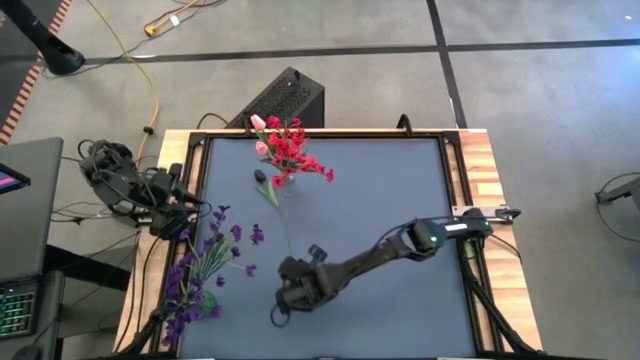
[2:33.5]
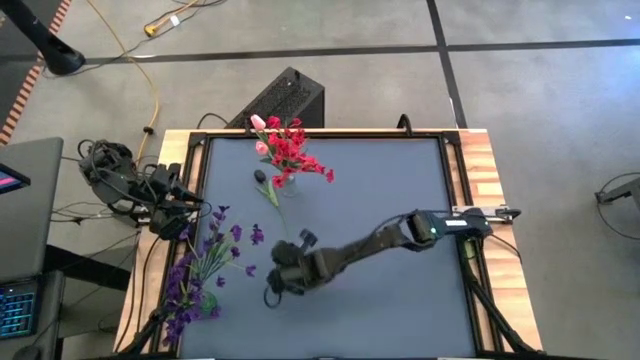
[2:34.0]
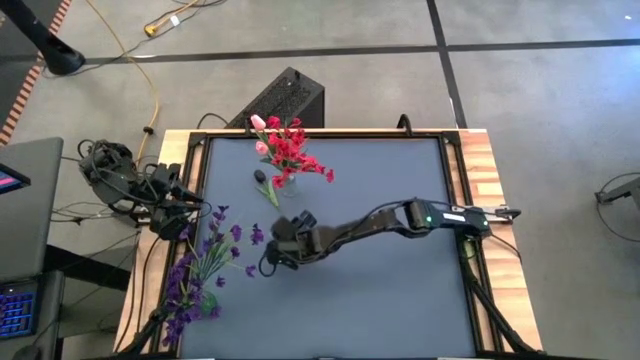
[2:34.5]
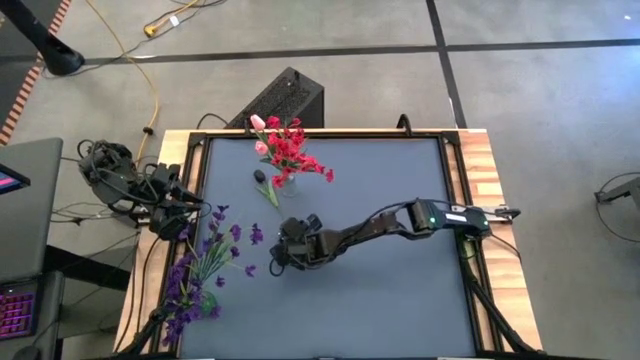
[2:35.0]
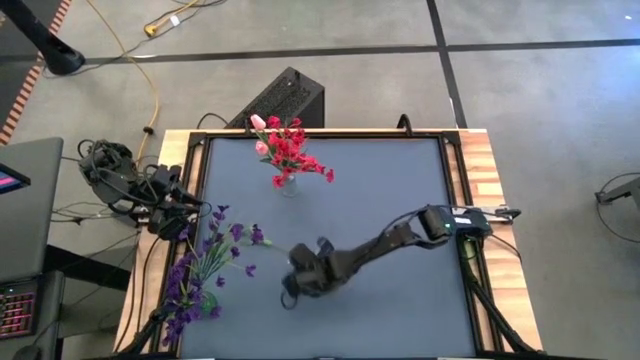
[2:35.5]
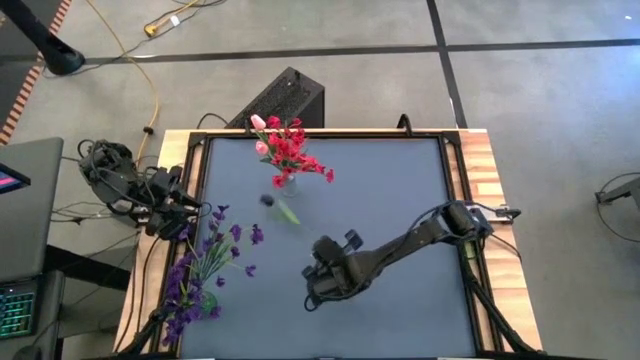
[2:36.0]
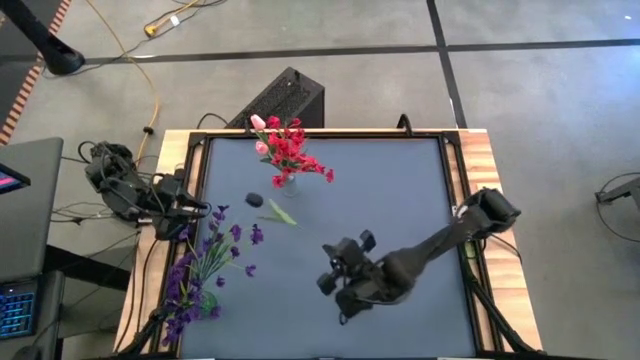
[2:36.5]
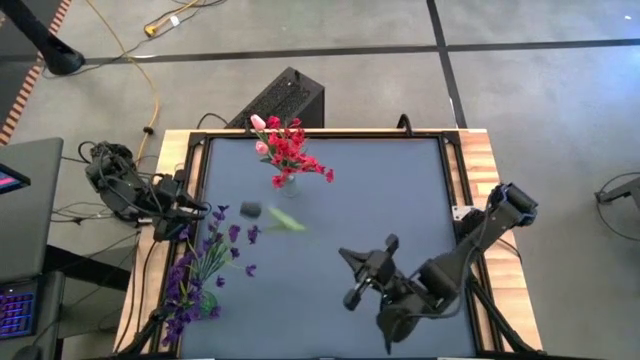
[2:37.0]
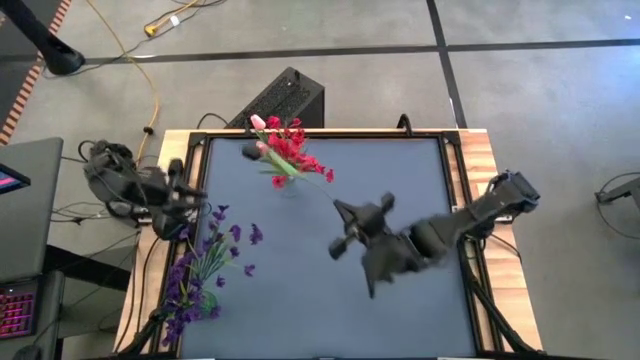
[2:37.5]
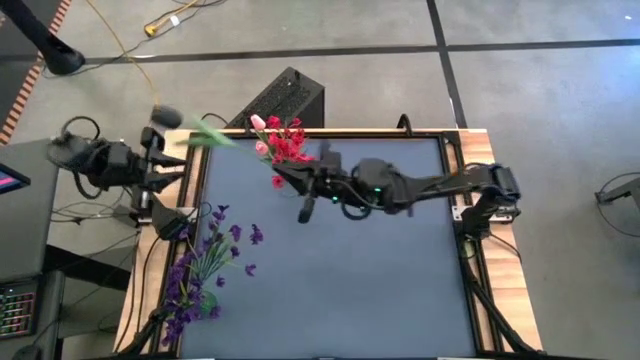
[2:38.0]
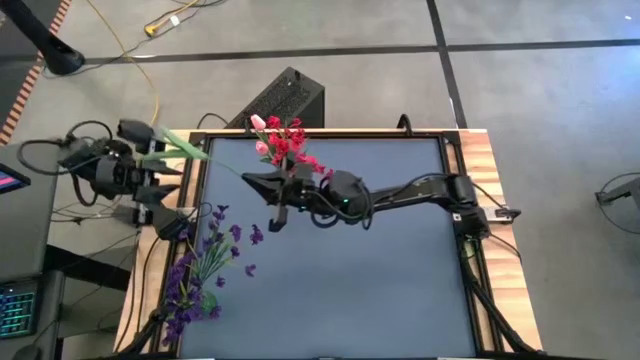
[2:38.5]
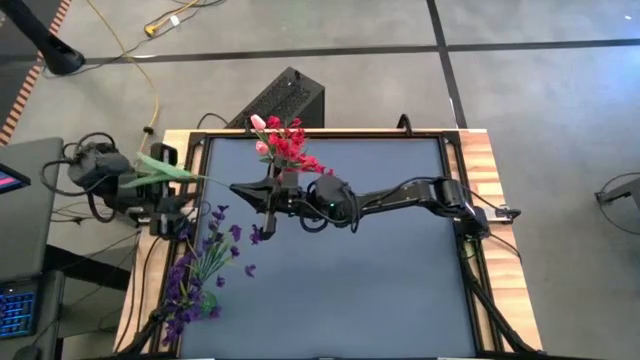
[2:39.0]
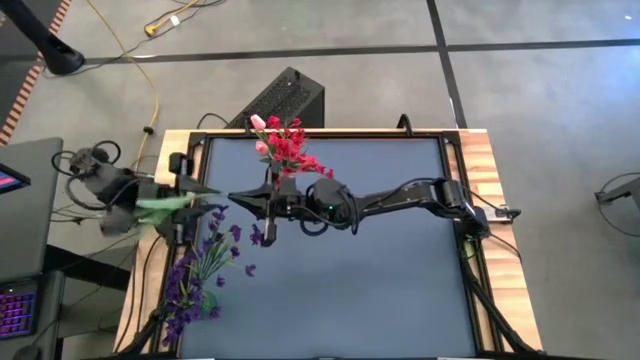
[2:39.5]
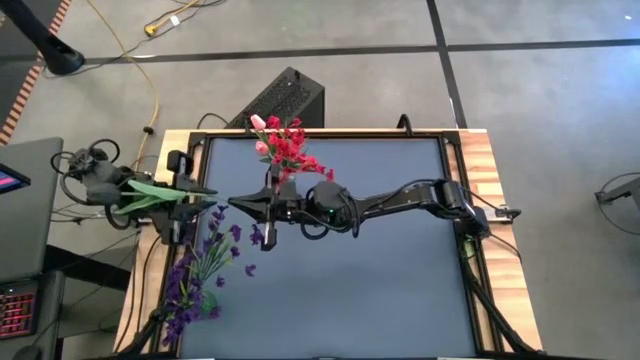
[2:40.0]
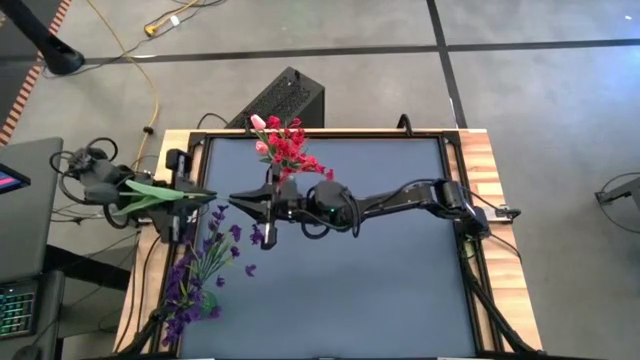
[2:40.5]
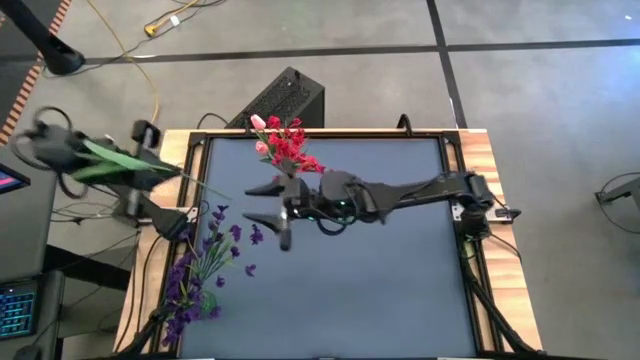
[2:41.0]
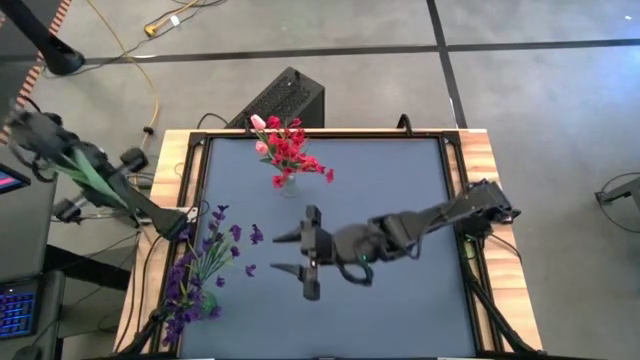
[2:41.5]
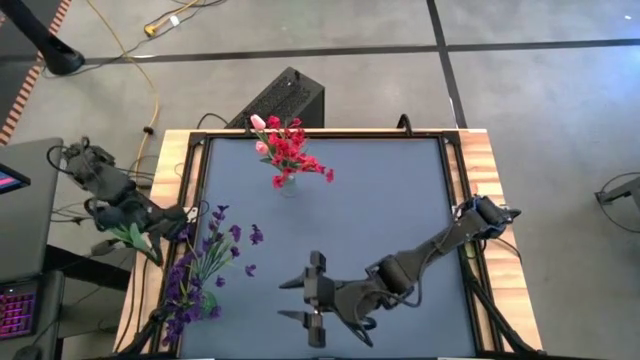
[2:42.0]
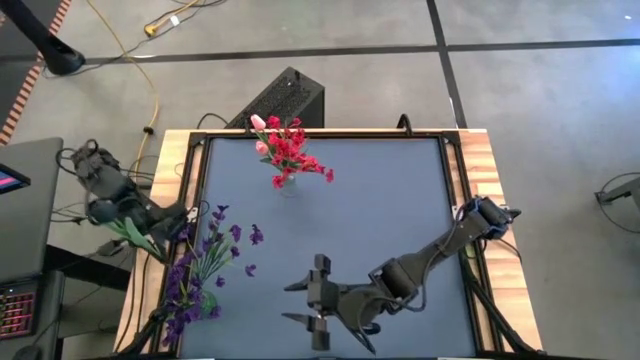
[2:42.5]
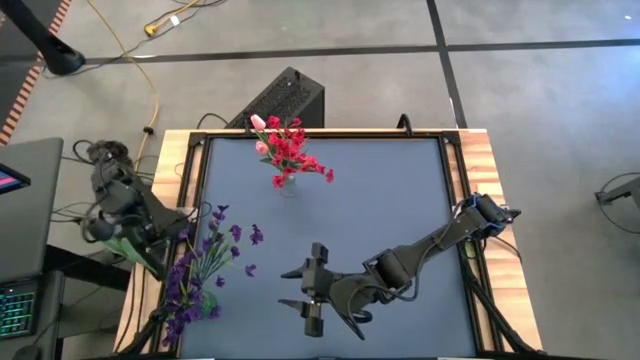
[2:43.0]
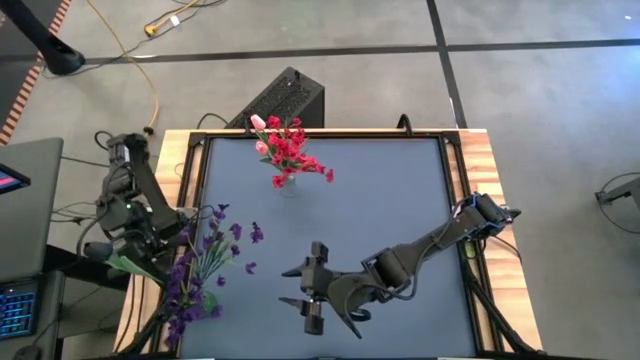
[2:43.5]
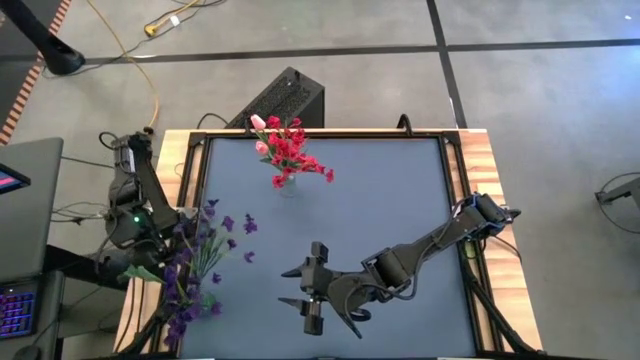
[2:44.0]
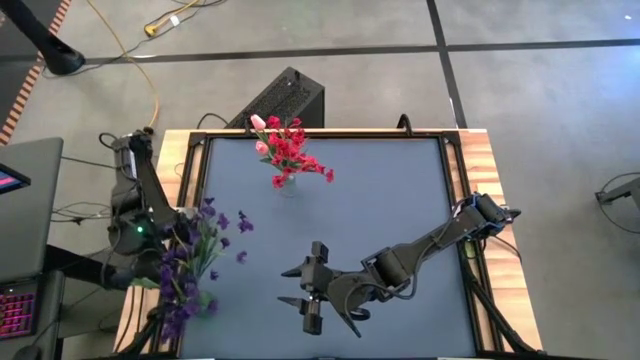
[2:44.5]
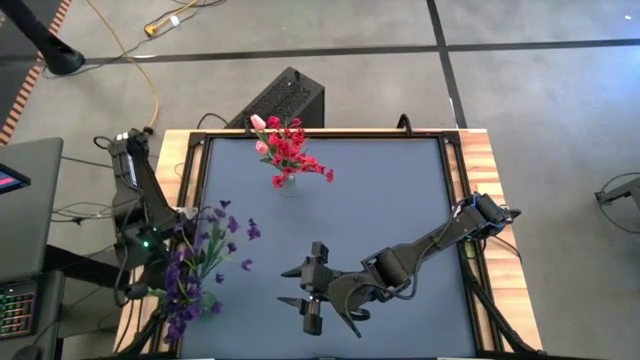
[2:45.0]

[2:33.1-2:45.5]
Task: Sort flowers into vase by color
Put the black tulip into the green vase

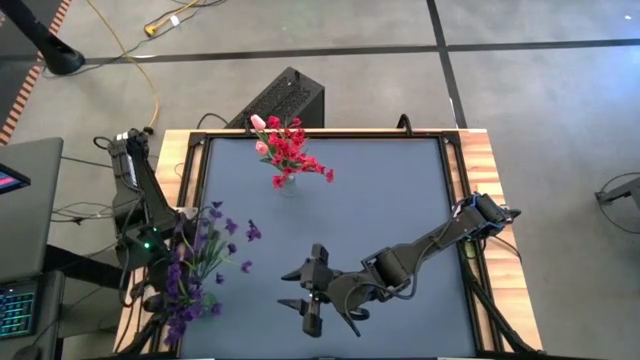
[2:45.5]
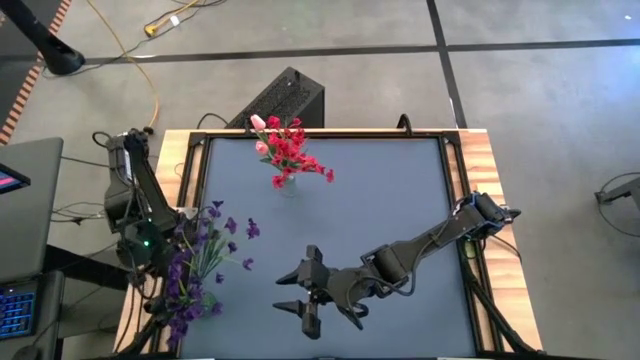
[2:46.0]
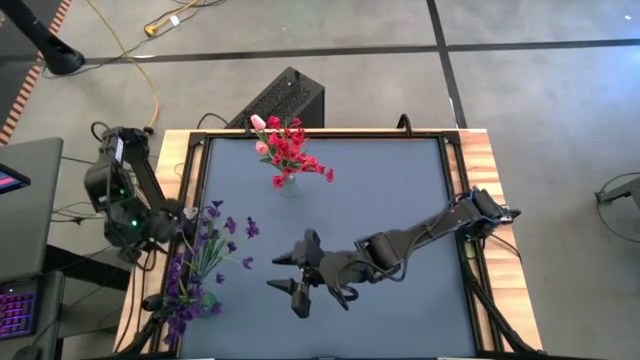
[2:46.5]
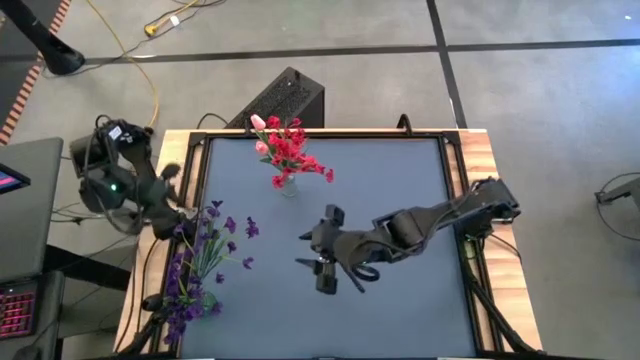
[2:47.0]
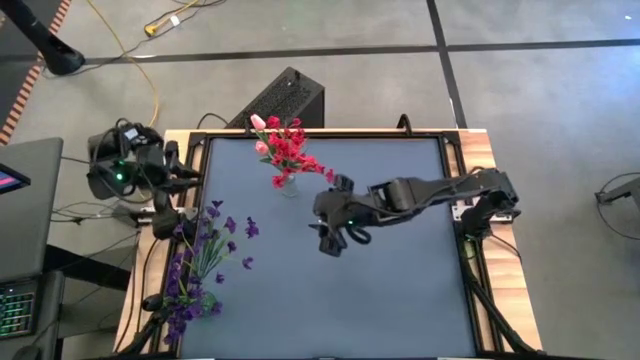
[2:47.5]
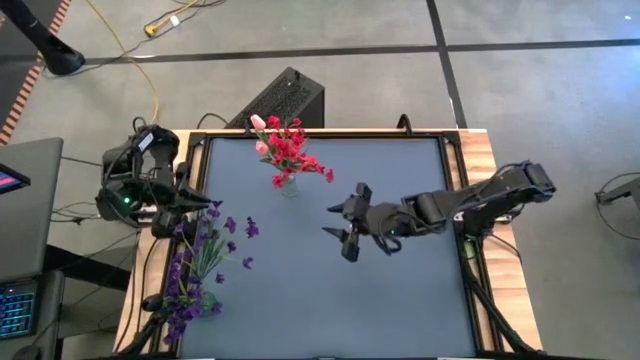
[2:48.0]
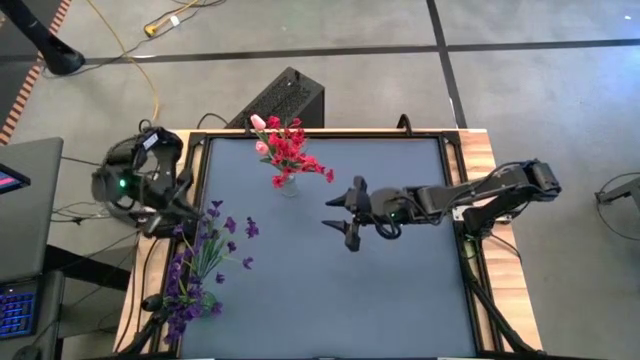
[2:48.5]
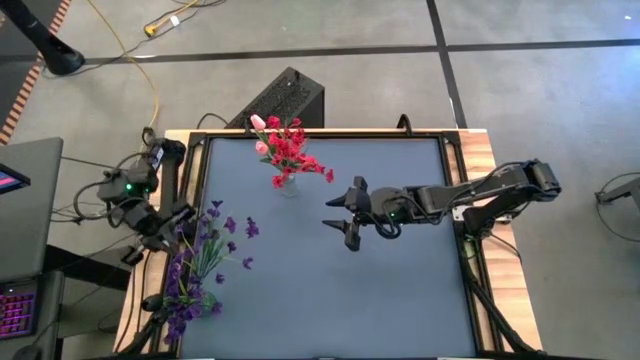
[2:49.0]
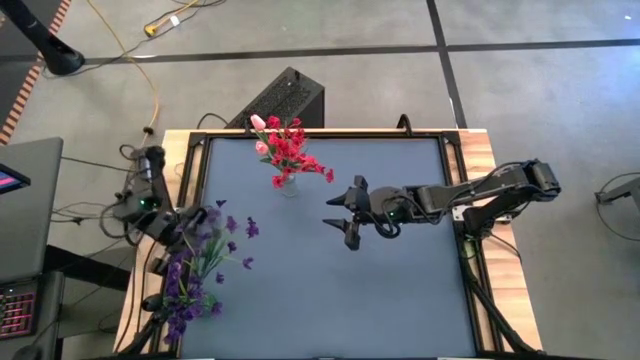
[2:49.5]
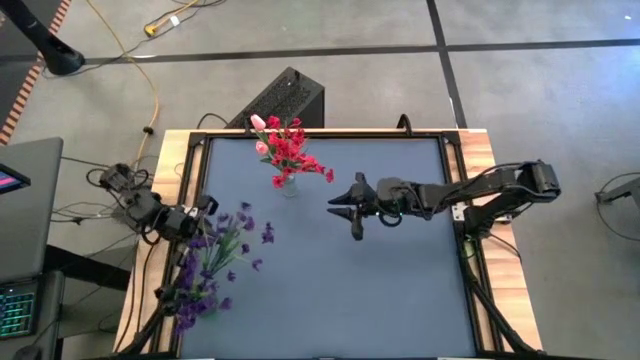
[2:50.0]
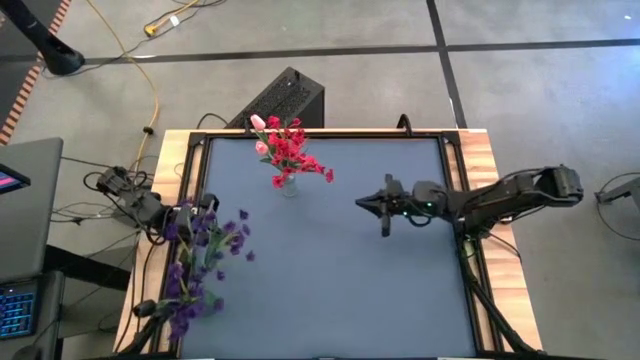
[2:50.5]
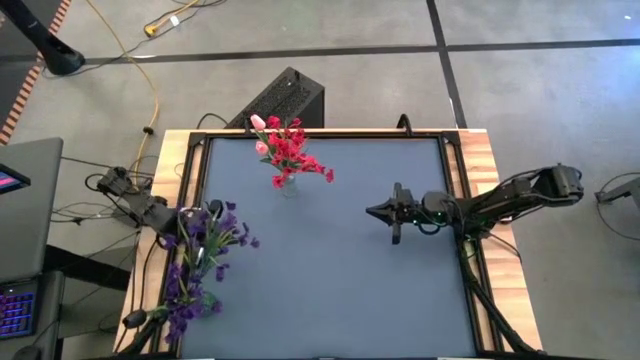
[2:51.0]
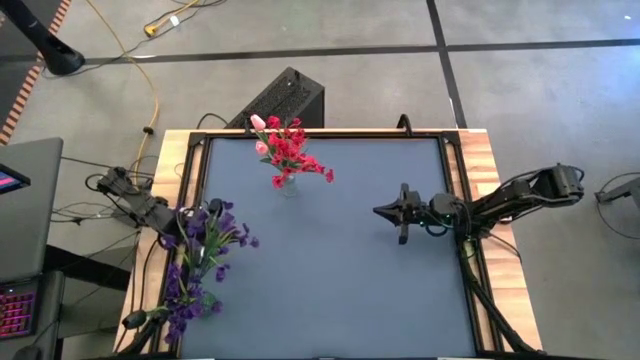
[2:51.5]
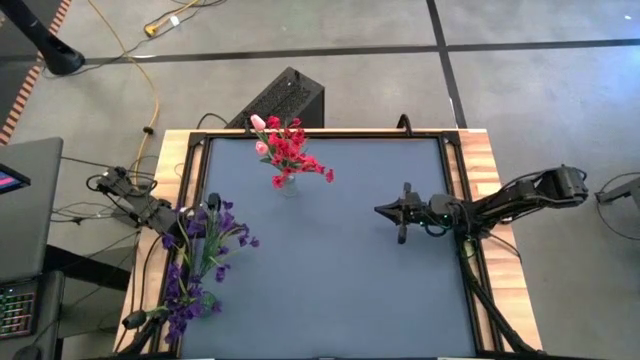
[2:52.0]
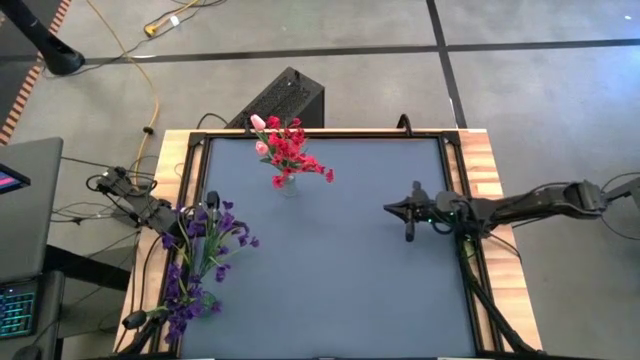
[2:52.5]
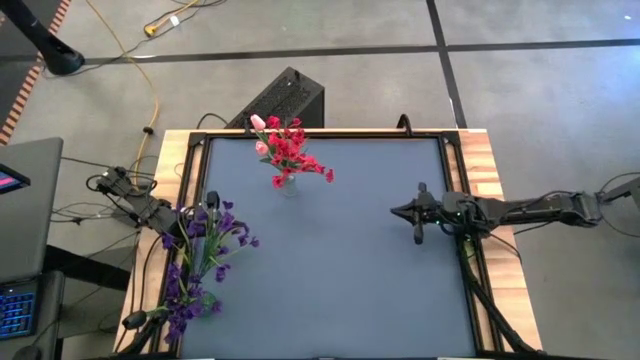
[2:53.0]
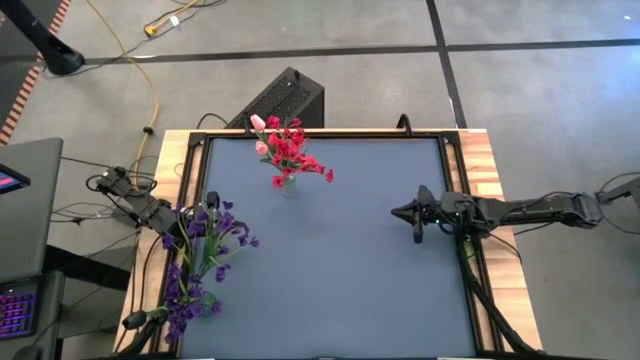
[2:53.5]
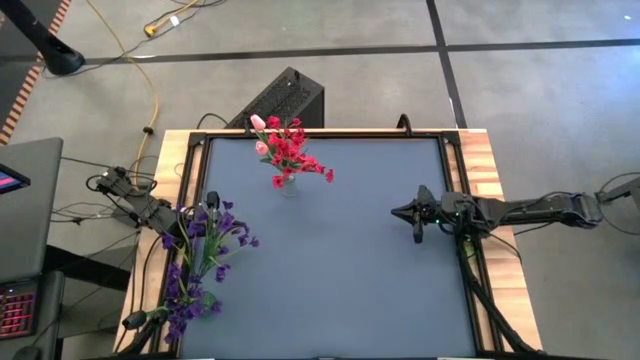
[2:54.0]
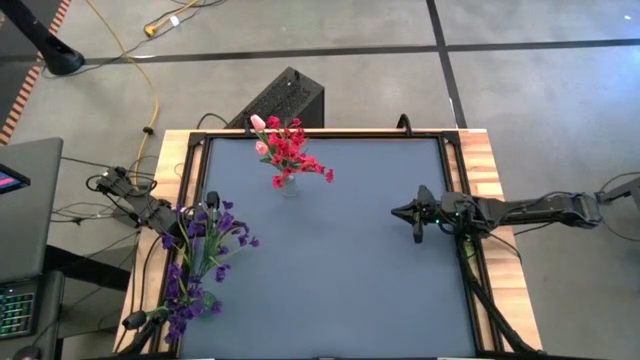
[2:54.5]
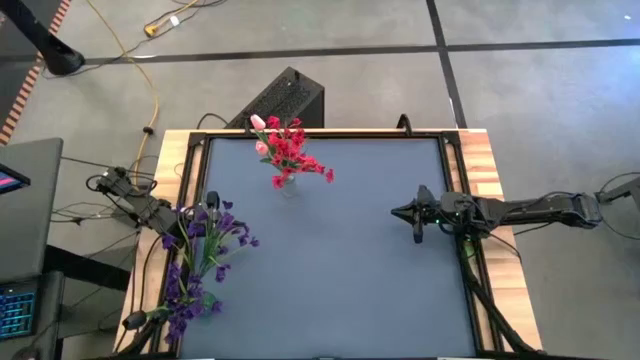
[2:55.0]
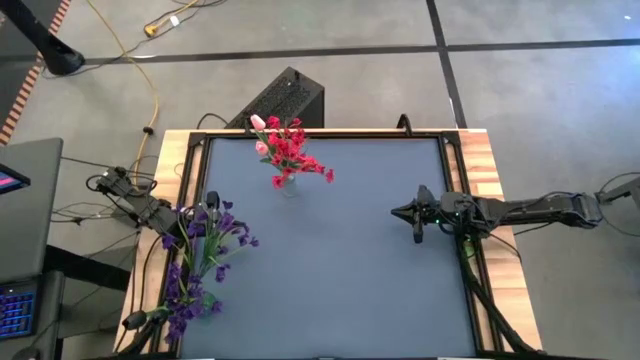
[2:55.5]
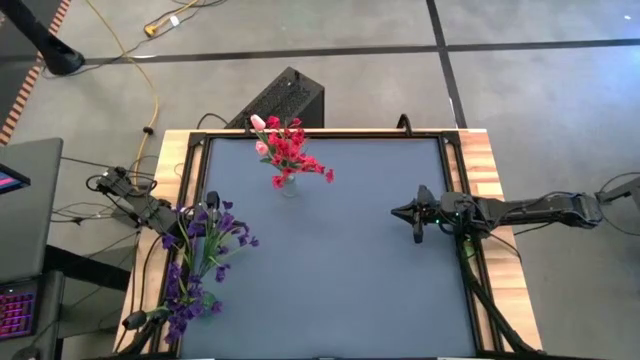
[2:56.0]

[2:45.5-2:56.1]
Return to Home Position
